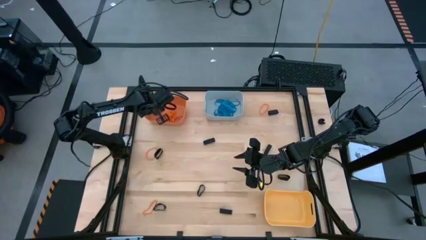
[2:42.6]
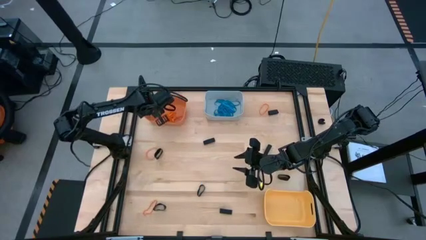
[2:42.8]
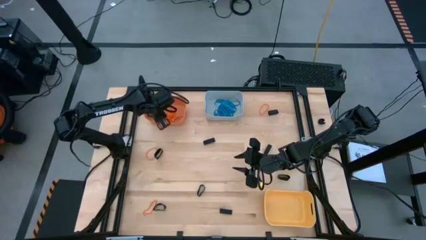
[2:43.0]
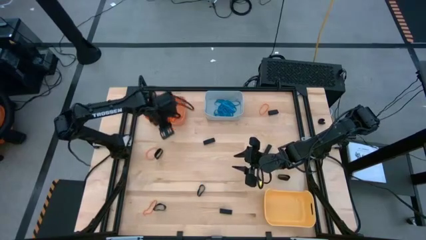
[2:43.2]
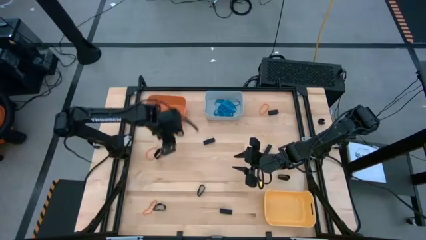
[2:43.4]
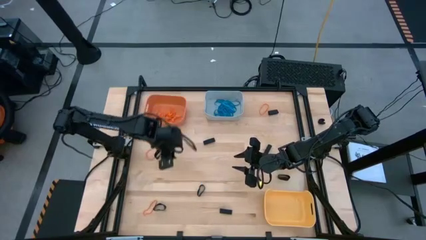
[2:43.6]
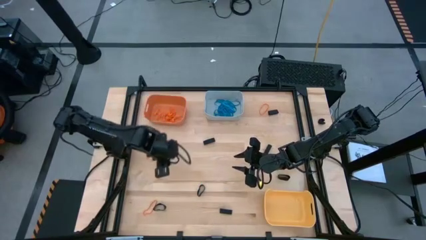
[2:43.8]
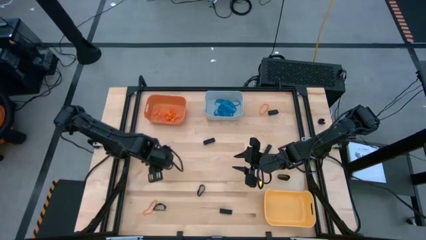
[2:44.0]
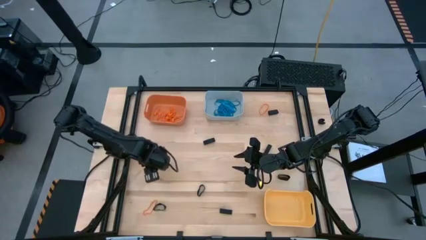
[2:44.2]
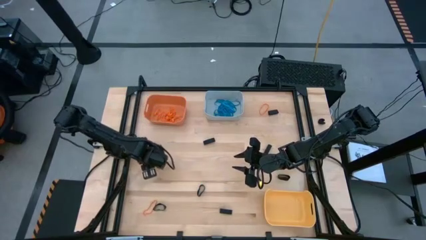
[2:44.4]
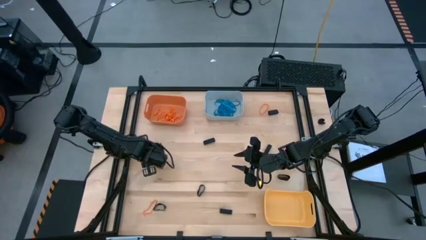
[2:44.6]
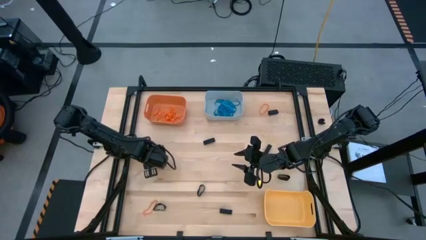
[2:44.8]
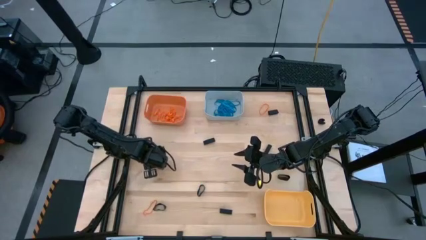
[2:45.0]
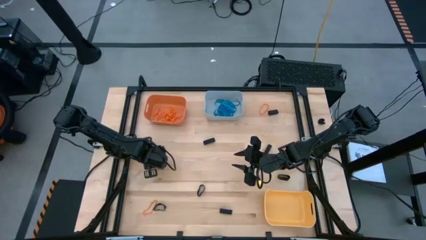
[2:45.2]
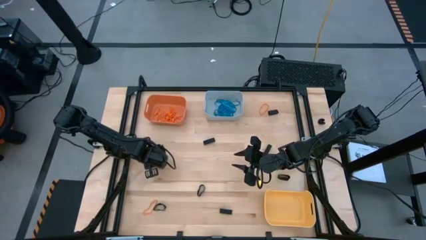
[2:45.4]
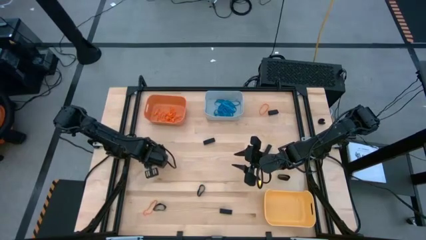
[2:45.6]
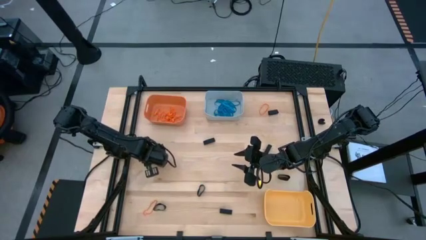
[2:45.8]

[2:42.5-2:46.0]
Task: Sort rubber bands into baskets
Put the orange rubberband into the orange bin

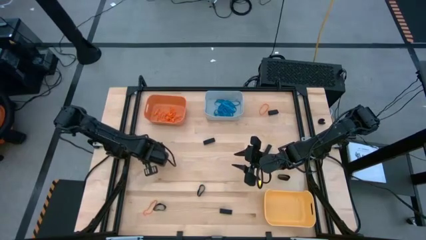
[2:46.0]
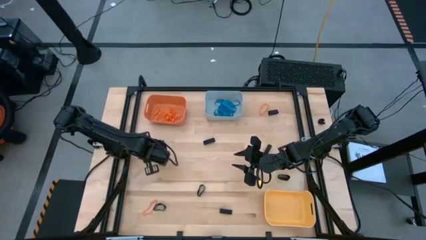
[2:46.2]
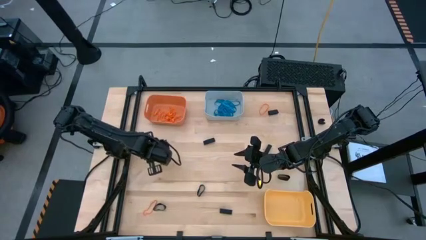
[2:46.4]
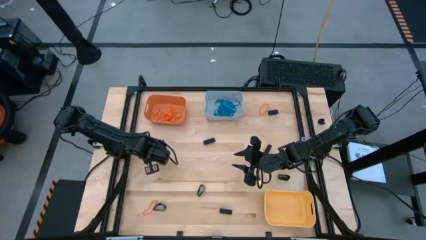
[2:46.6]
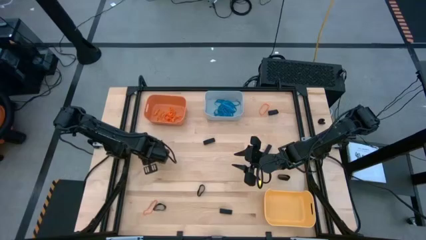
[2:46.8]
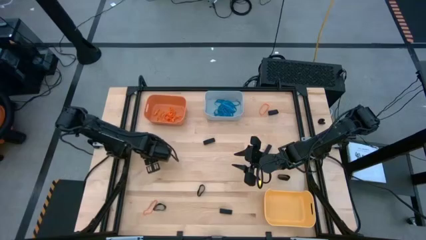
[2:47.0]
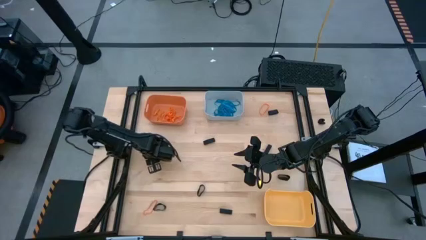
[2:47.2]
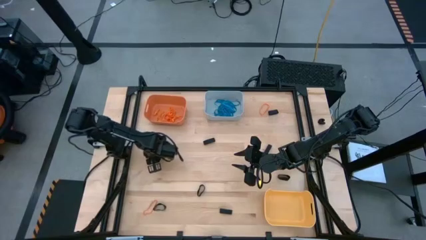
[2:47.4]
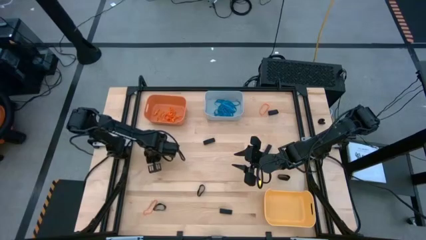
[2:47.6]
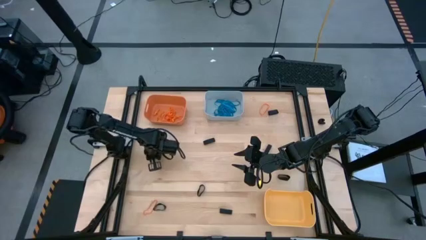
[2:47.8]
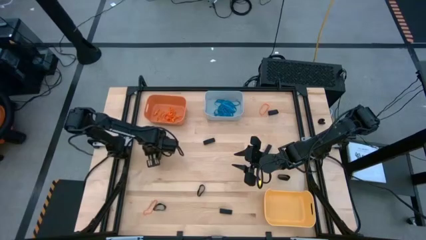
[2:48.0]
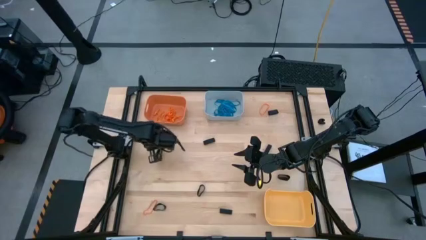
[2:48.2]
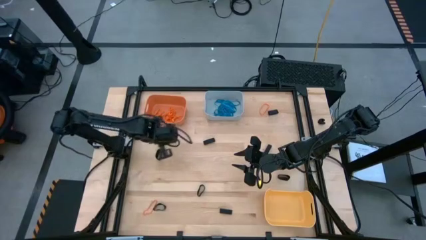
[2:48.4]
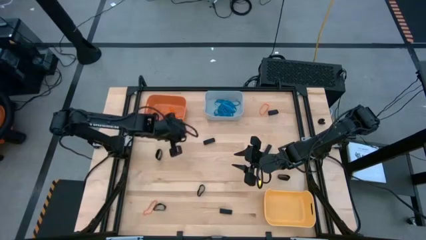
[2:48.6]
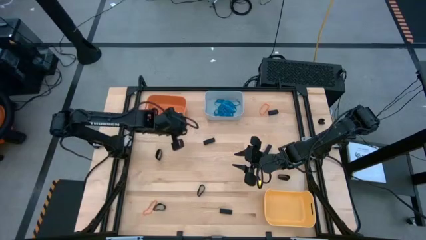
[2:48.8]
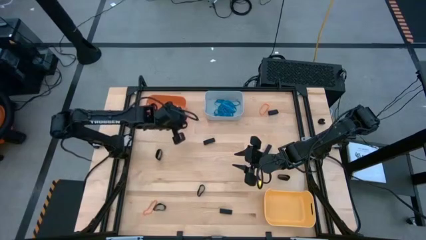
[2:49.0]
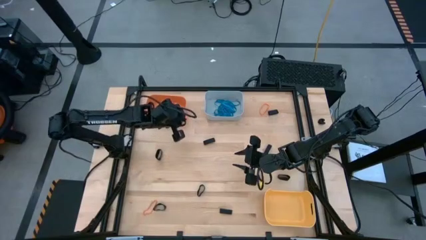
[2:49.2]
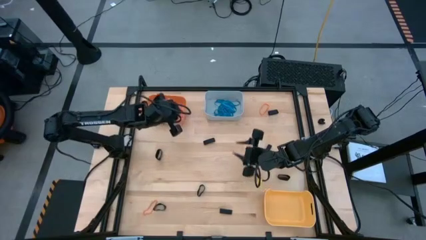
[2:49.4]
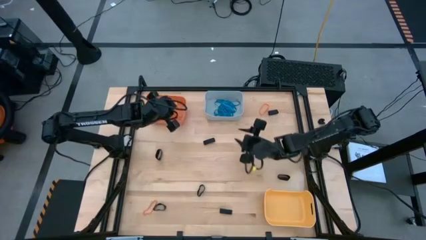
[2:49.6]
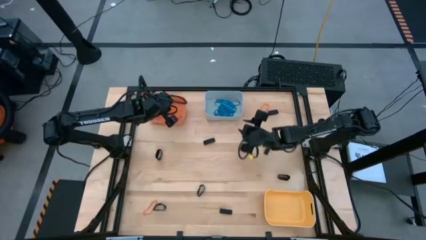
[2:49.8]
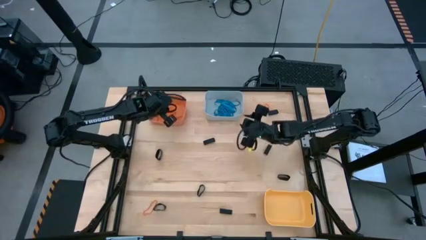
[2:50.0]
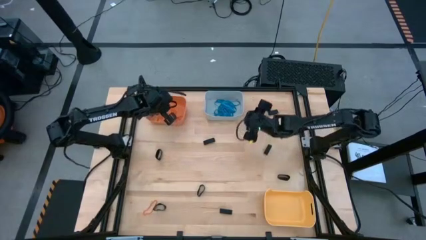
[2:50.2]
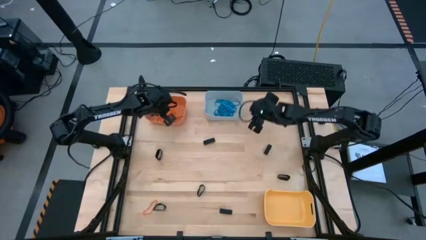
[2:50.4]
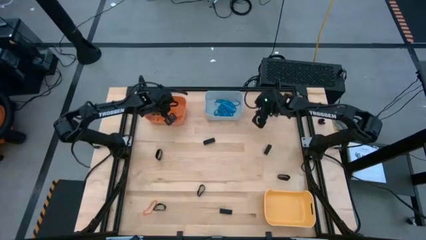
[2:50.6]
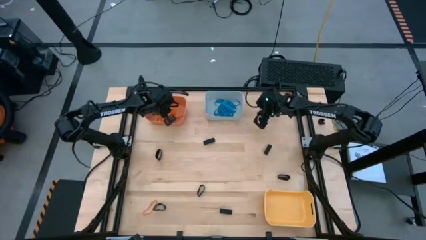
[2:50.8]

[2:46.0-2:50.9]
Put the orange rubberband into the orange bin

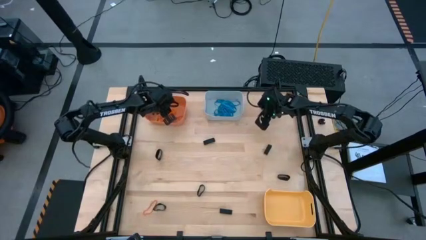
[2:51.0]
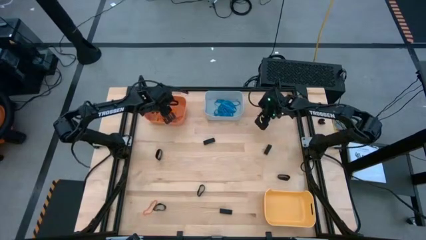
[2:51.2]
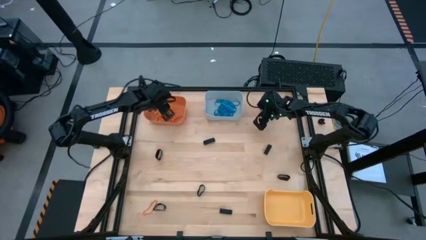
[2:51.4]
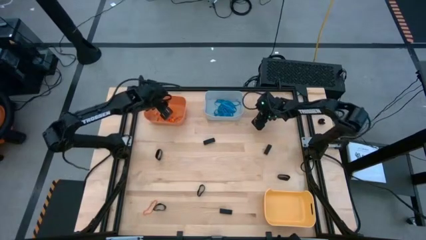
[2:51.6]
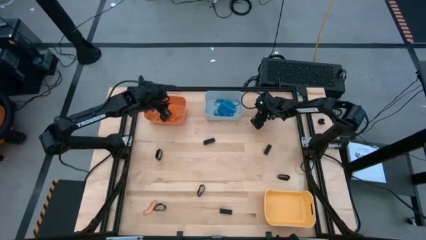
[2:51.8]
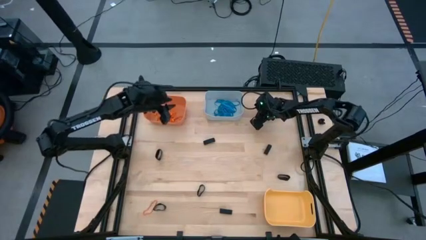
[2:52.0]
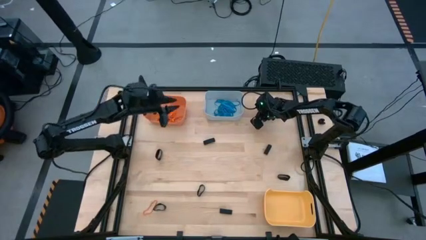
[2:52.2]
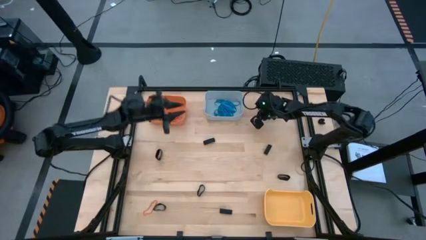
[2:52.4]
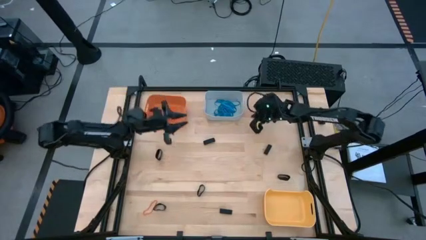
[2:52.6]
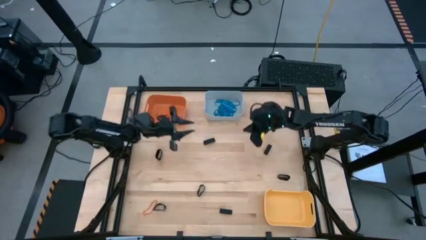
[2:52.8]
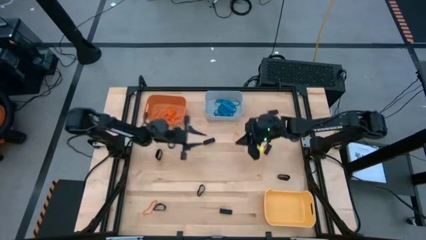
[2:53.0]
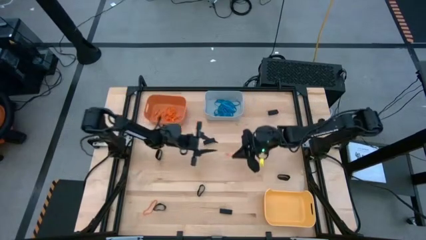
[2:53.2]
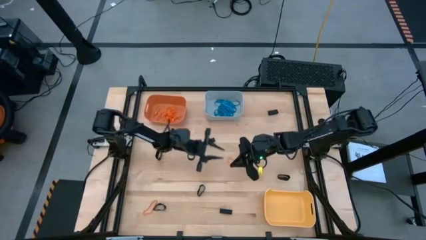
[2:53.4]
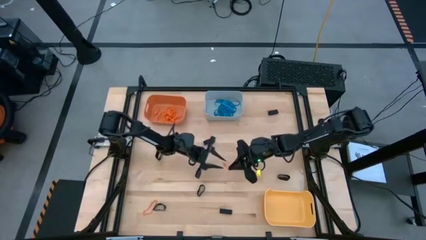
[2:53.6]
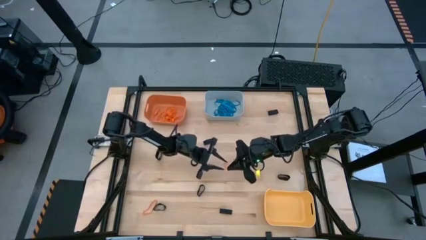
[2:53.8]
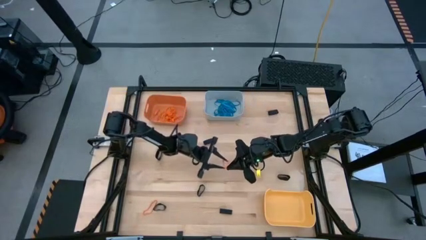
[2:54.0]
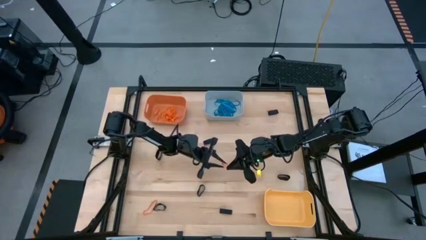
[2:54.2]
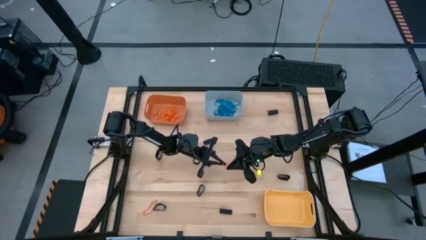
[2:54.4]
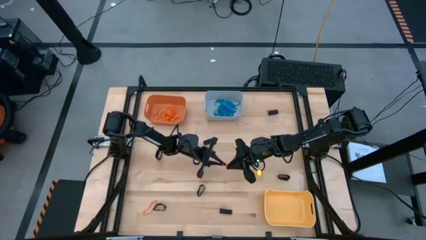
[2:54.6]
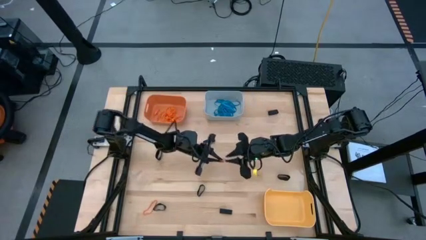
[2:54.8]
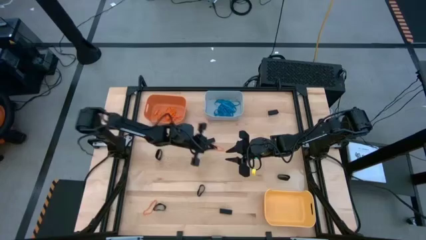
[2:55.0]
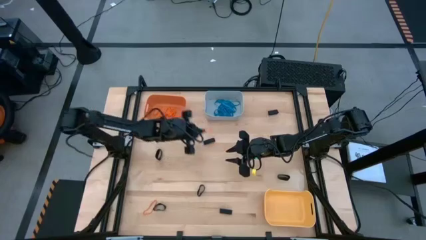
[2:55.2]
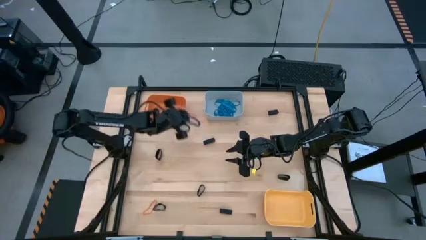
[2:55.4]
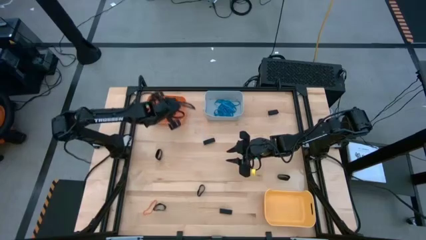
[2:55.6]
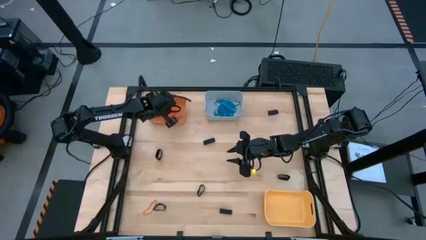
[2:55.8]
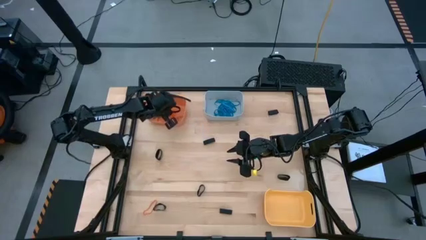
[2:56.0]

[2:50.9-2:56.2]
Put the orange rubberband into the orange bin

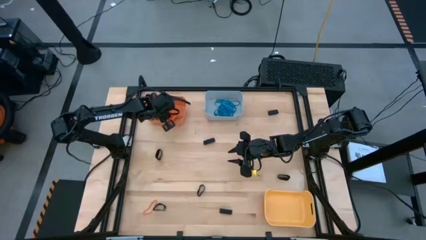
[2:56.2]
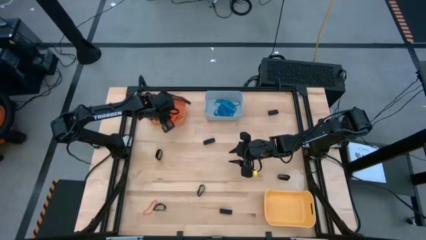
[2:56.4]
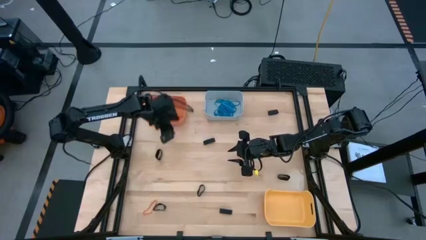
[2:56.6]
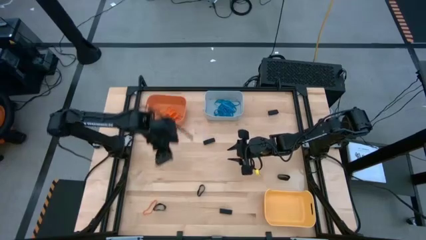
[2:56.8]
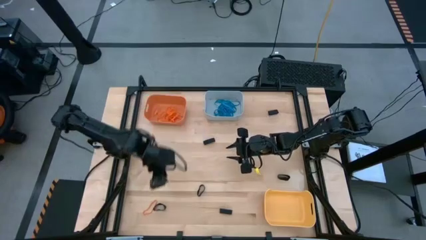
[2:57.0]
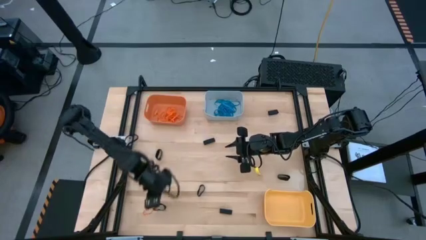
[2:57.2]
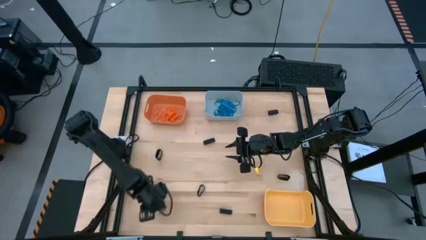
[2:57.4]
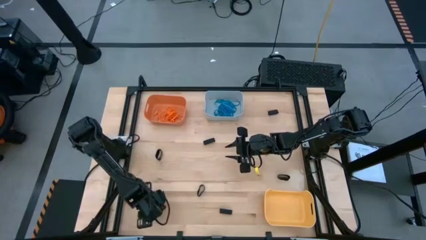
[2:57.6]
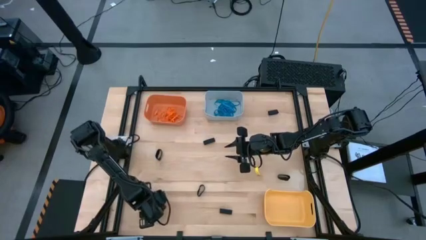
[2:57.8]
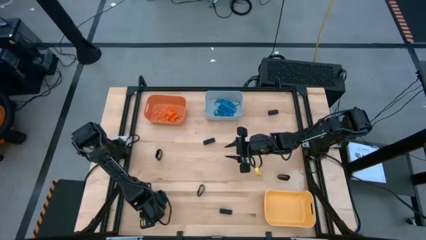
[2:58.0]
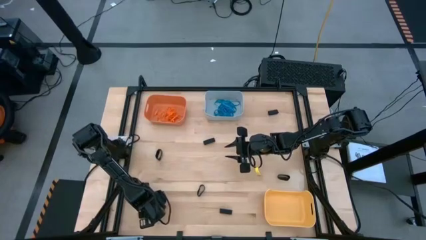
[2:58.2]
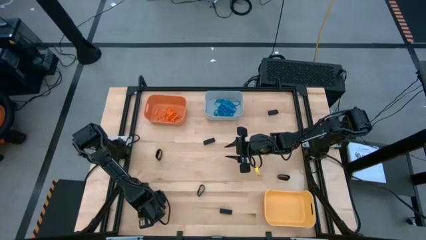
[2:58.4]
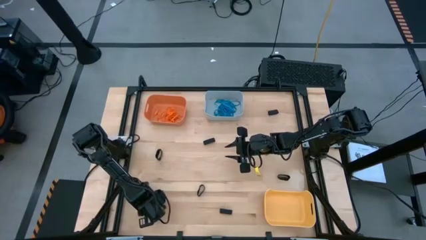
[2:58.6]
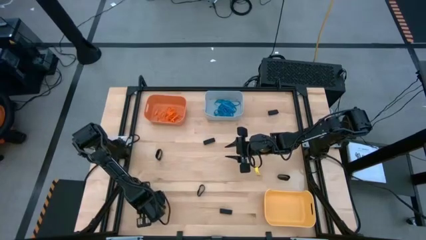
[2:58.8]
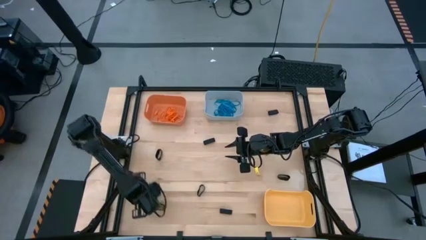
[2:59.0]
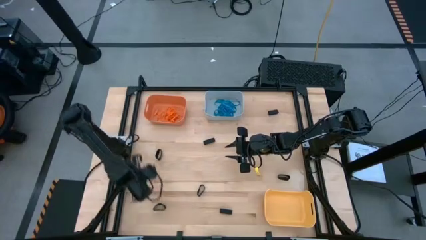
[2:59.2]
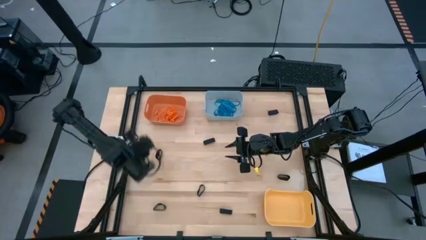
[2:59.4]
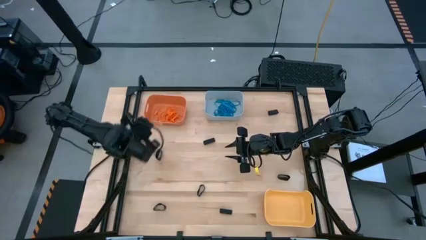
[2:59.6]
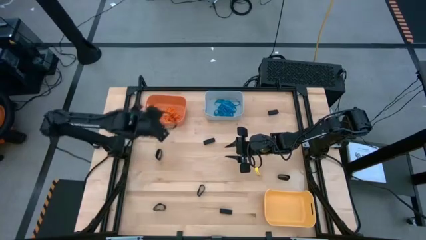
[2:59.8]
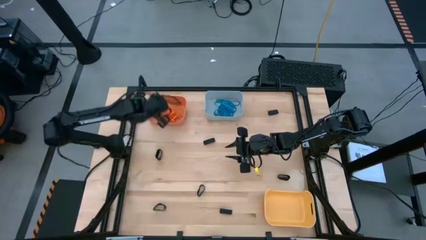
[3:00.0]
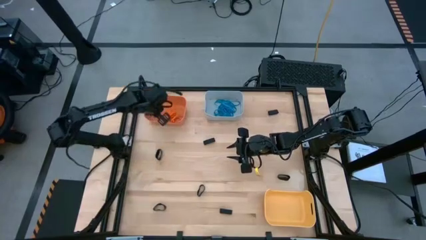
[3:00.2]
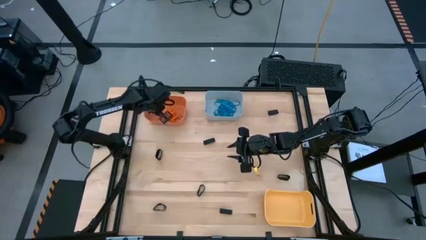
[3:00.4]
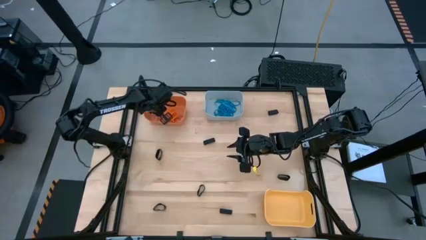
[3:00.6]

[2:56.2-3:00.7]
Put the orange rubberband into the orange bin
